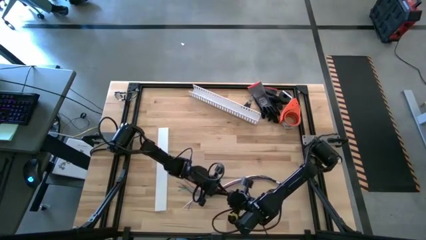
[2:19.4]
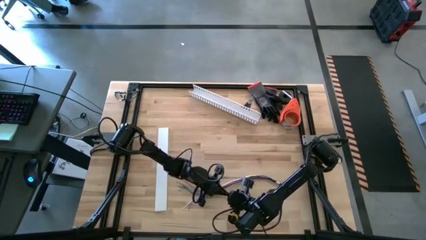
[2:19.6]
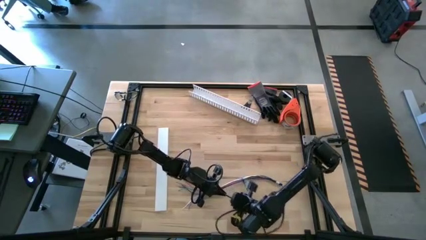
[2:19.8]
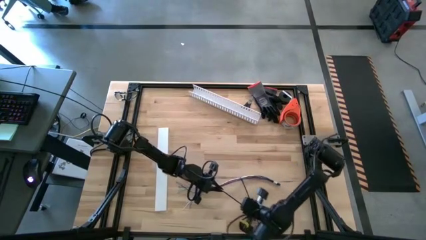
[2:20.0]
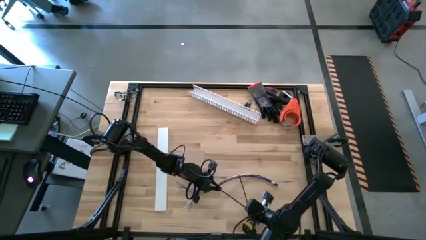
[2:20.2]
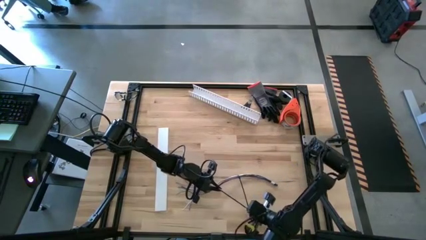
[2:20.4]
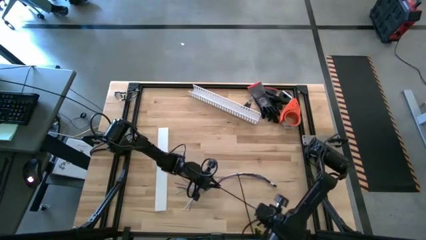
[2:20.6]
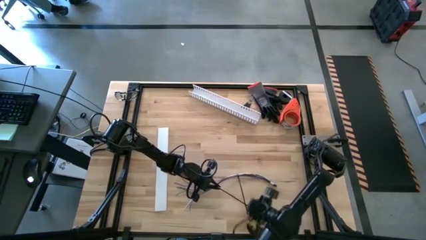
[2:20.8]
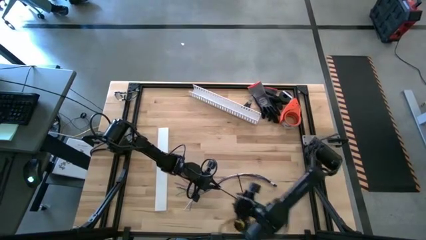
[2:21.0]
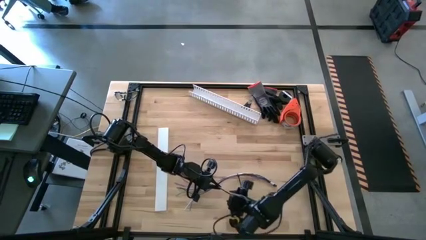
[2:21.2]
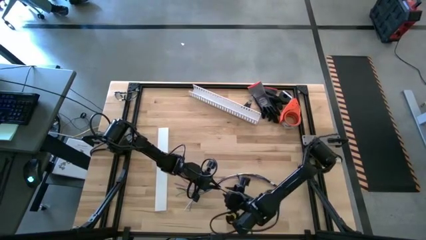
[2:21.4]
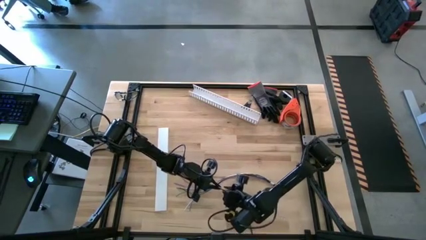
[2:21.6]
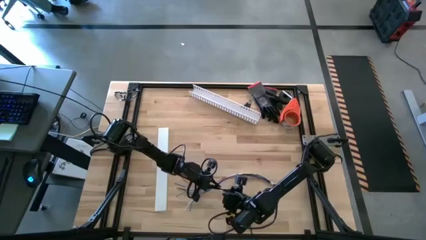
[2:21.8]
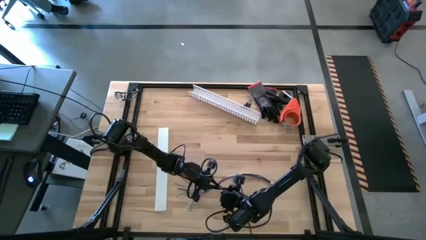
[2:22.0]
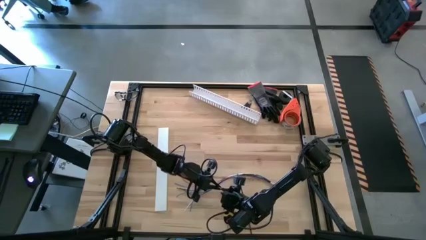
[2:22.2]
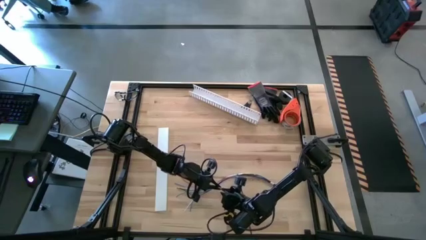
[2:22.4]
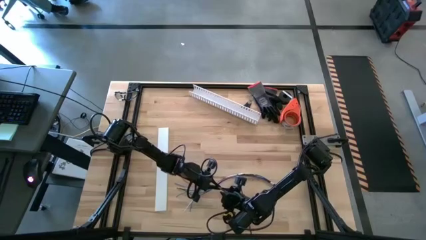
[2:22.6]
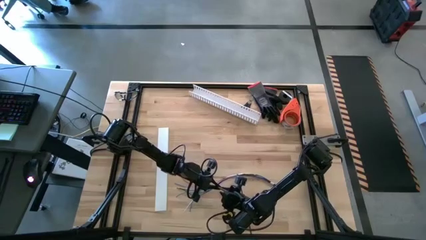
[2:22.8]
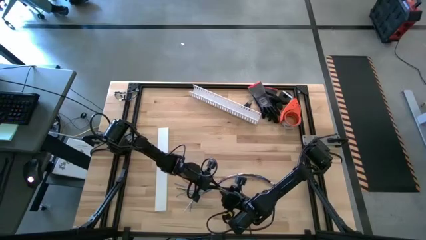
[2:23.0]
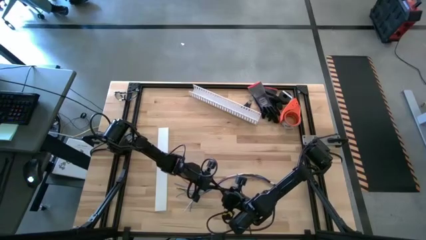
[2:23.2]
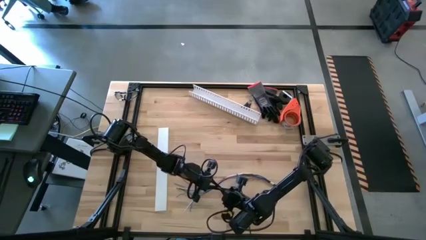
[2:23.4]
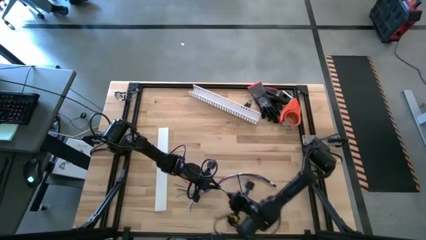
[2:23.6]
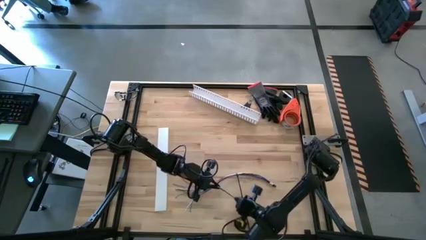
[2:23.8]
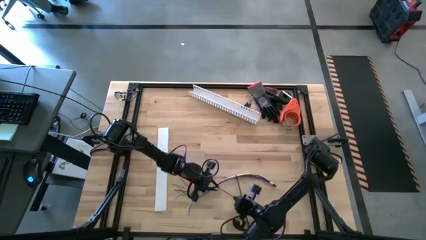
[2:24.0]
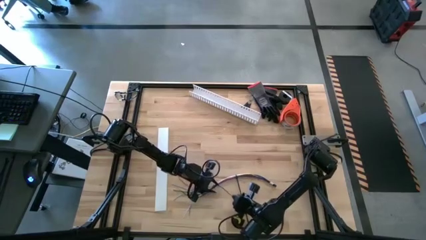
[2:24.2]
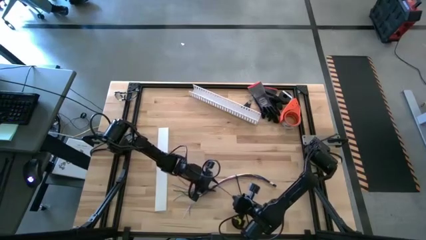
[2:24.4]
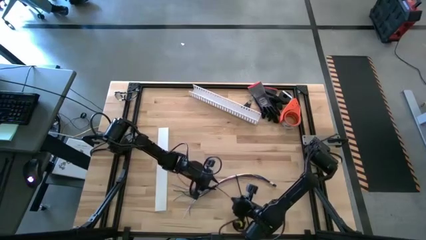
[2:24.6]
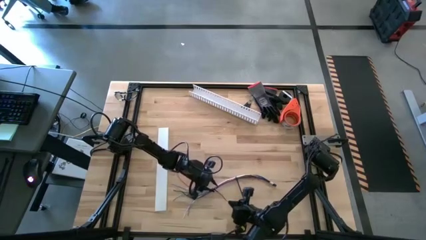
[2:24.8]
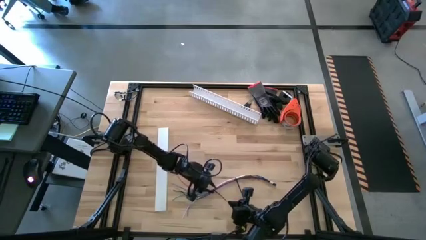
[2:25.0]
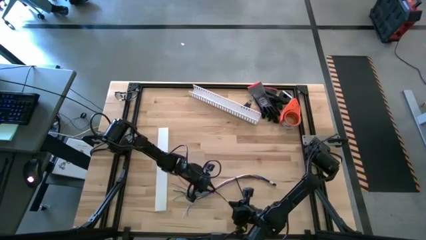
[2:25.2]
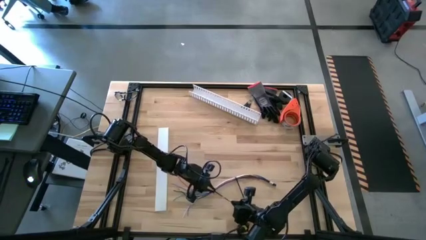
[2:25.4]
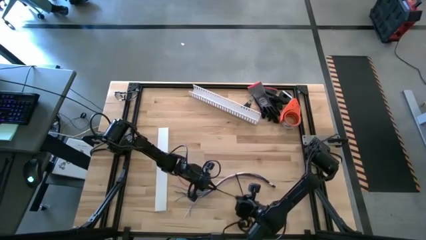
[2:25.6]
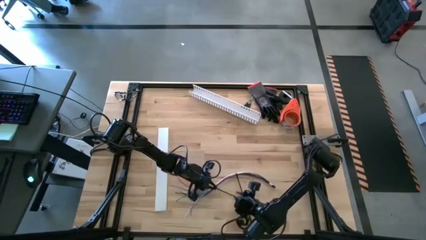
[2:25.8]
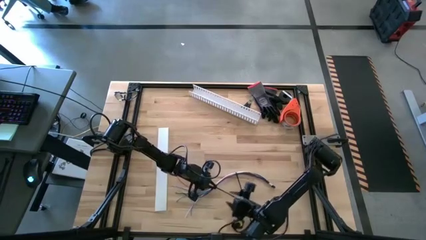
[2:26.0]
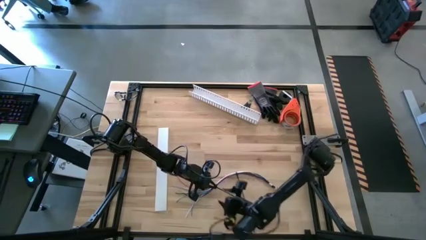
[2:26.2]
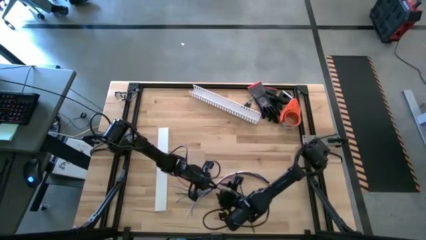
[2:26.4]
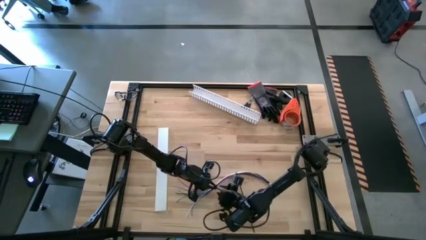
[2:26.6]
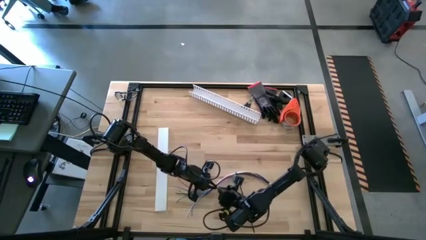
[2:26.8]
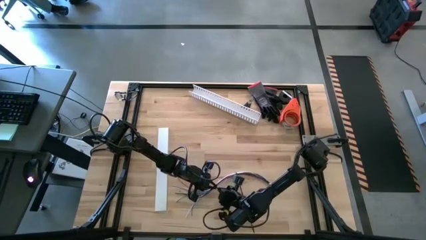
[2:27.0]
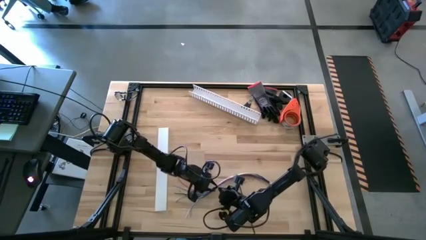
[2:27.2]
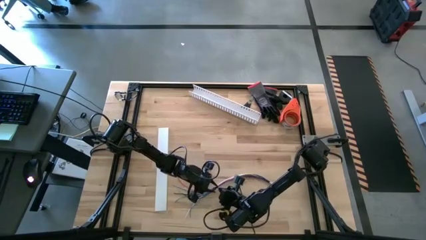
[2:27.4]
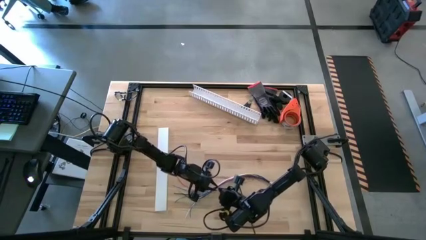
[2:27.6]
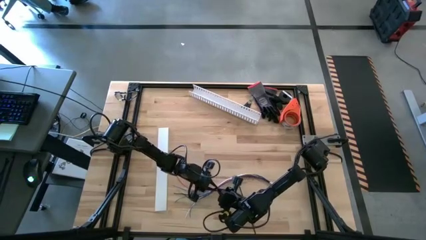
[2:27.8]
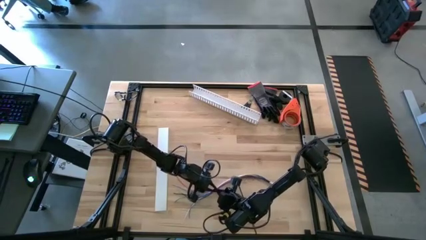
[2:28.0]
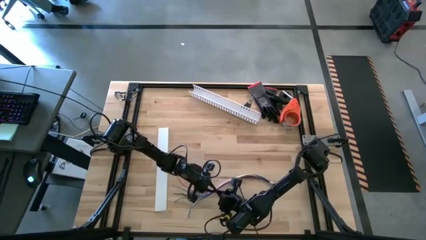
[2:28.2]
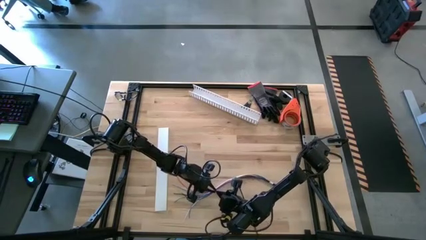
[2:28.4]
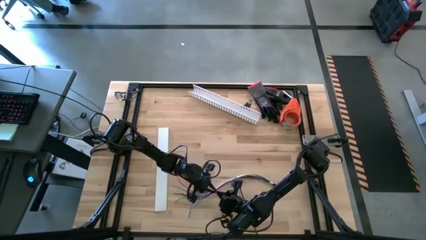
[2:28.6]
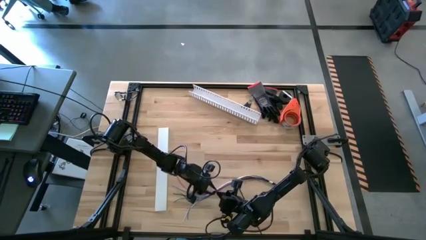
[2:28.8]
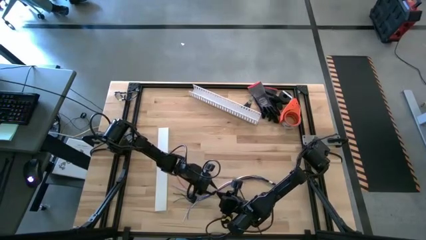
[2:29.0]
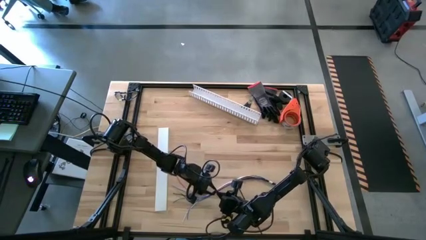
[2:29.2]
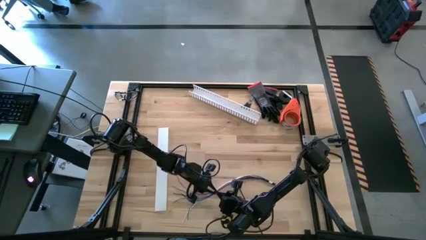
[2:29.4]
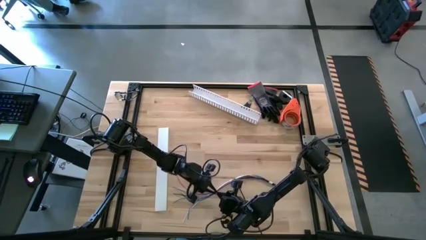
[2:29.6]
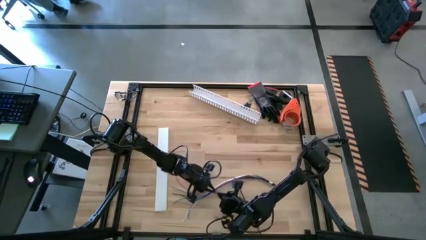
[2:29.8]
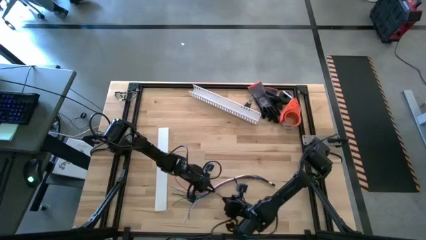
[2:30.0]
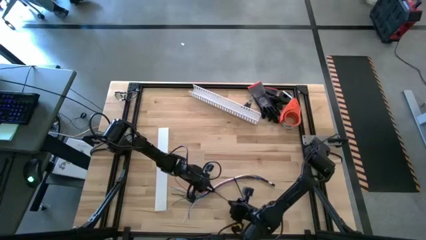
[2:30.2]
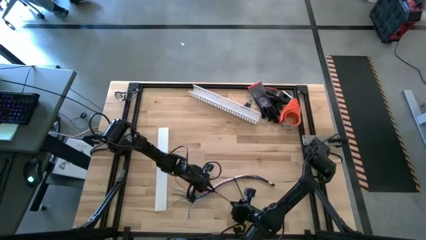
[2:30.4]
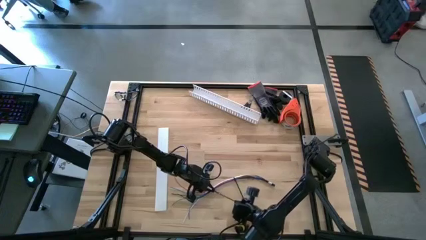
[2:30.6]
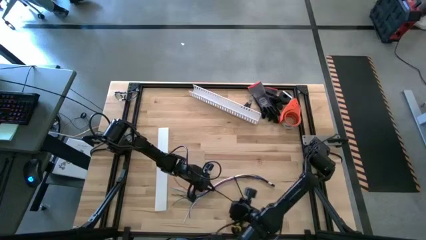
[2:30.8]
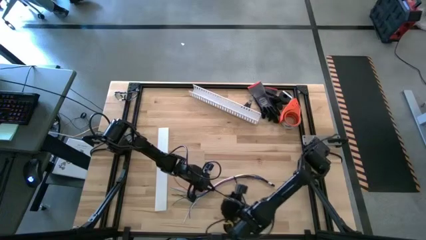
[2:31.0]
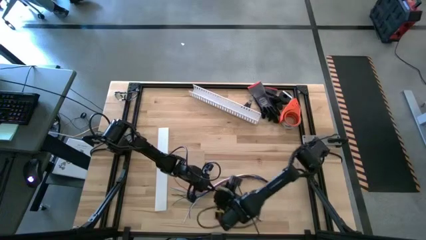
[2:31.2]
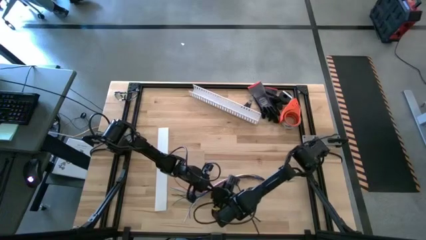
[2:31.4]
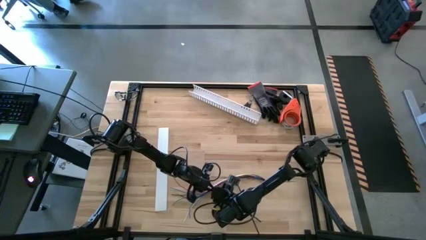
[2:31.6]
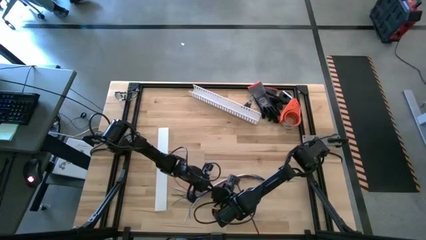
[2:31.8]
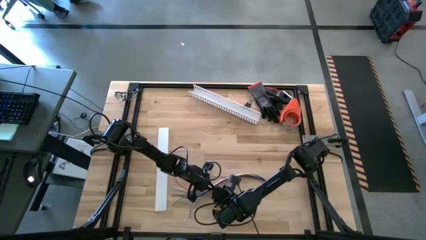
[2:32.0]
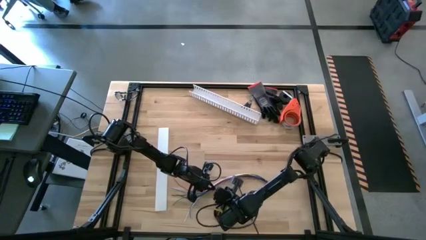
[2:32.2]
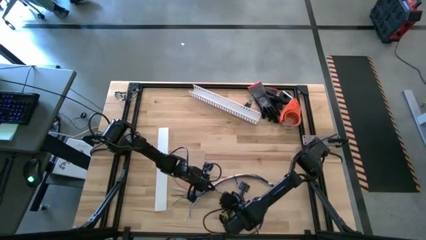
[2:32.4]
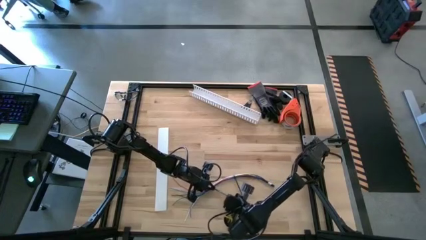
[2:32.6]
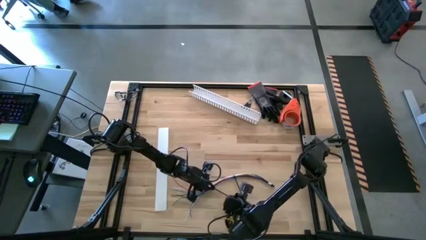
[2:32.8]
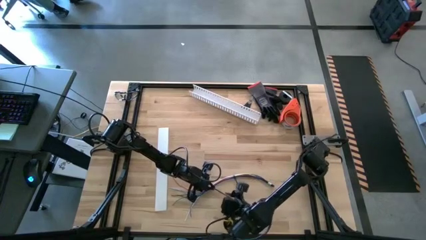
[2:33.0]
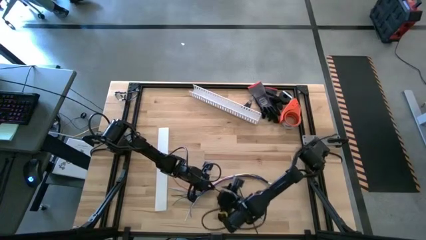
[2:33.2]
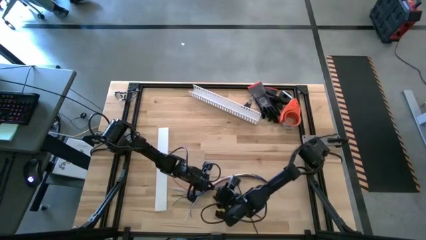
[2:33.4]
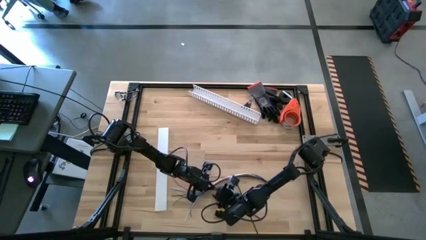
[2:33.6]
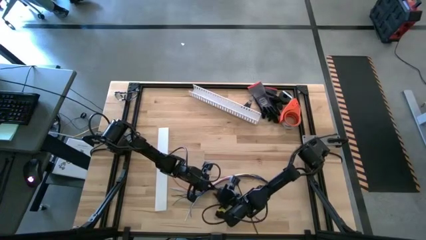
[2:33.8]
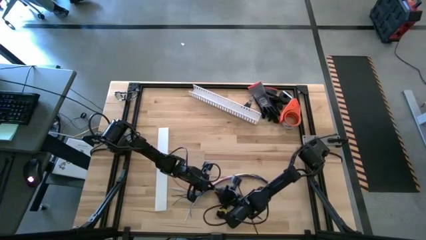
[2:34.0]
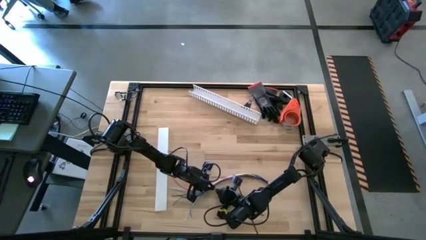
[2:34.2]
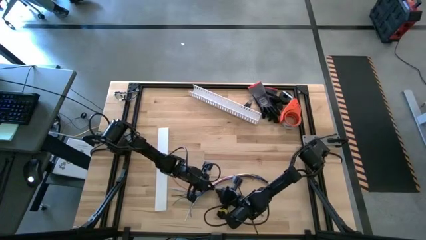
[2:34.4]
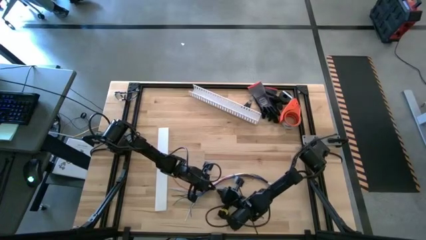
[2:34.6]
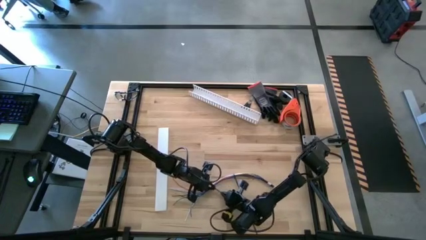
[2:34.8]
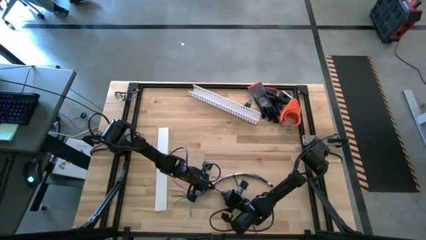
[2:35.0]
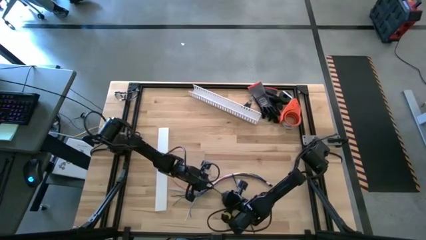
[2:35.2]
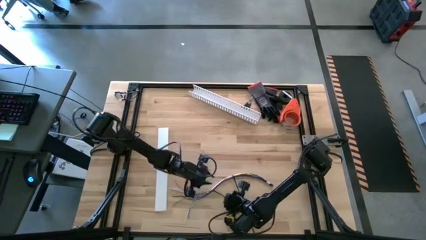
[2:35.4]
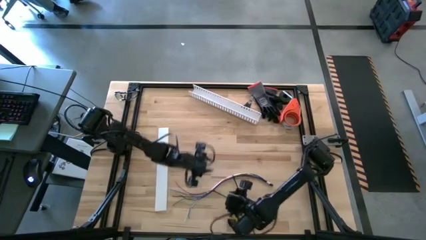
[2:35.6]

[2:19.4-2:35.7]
Task: Ziptie cables
Wrap the zip tie on the cable
